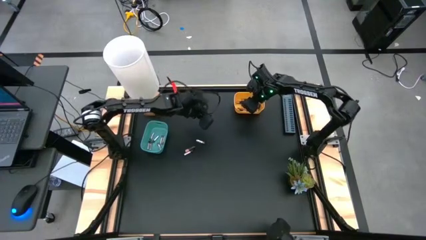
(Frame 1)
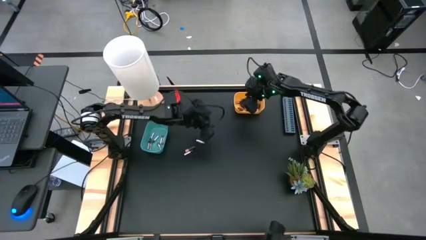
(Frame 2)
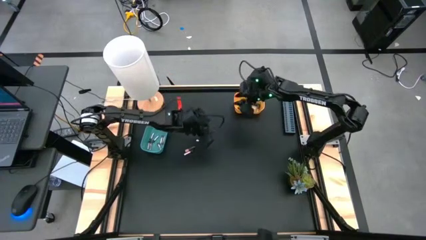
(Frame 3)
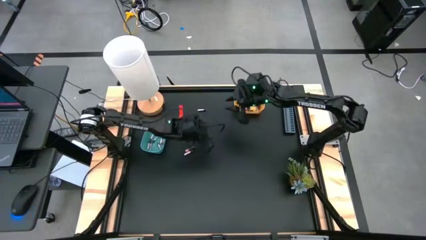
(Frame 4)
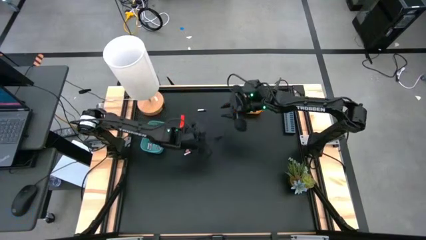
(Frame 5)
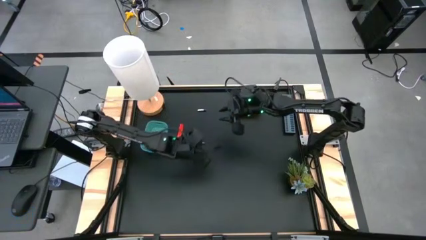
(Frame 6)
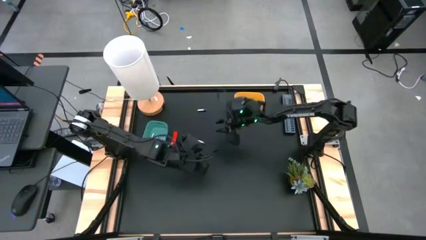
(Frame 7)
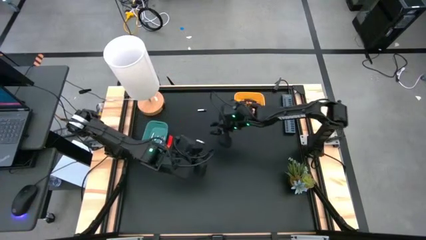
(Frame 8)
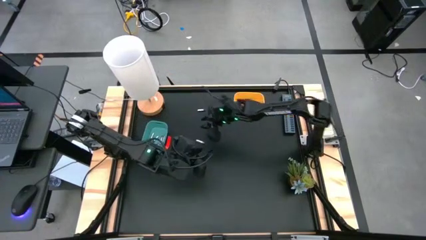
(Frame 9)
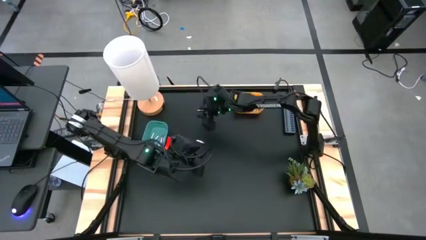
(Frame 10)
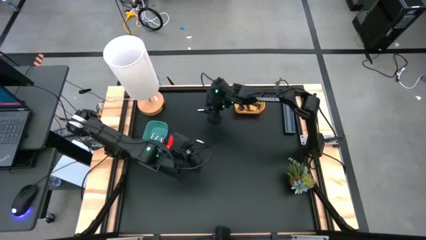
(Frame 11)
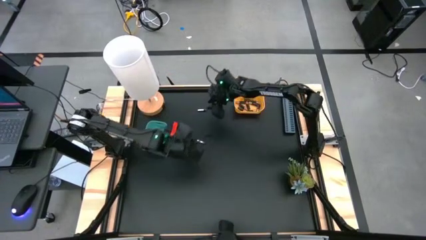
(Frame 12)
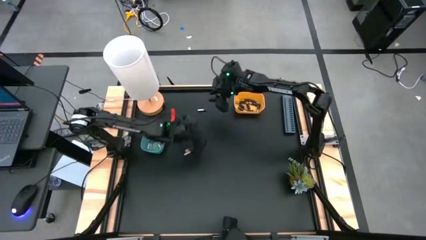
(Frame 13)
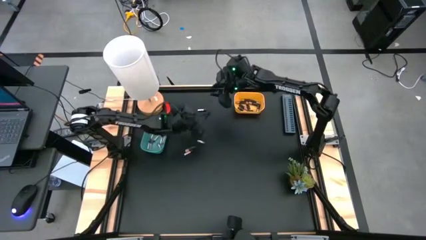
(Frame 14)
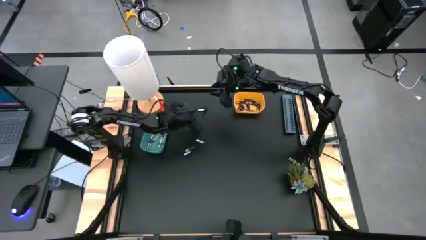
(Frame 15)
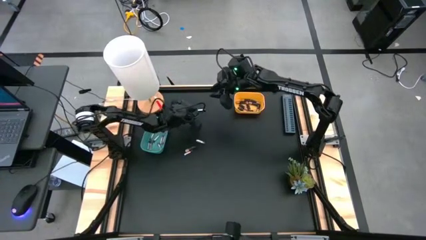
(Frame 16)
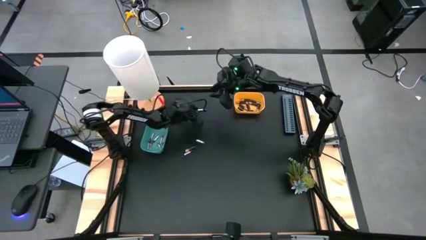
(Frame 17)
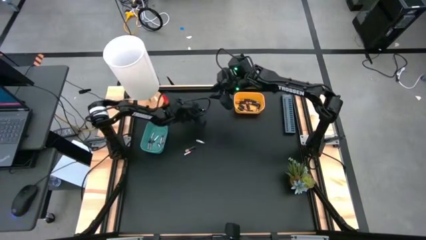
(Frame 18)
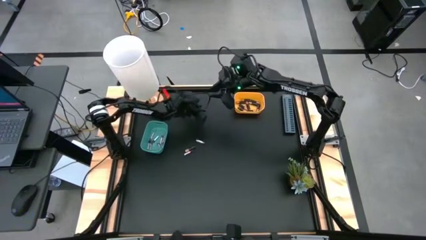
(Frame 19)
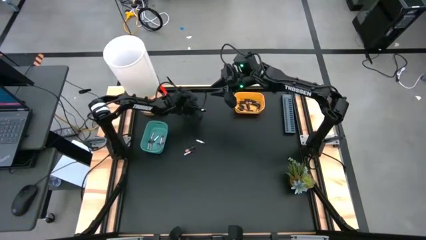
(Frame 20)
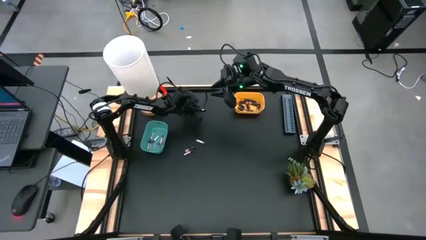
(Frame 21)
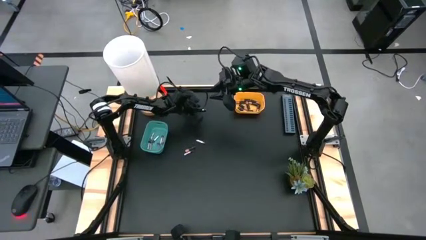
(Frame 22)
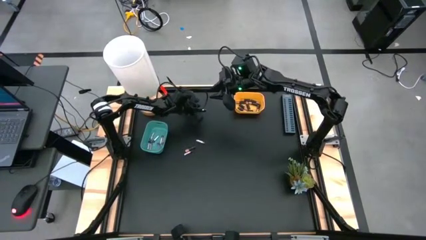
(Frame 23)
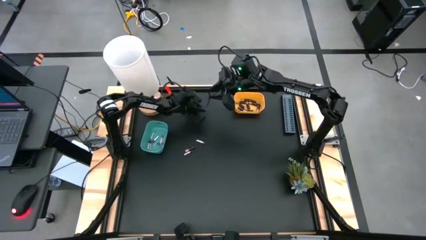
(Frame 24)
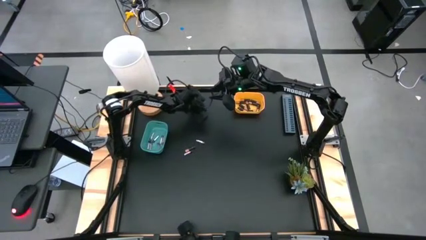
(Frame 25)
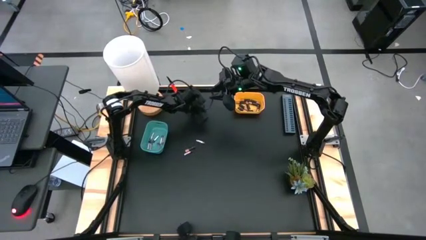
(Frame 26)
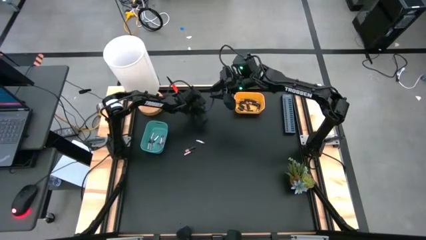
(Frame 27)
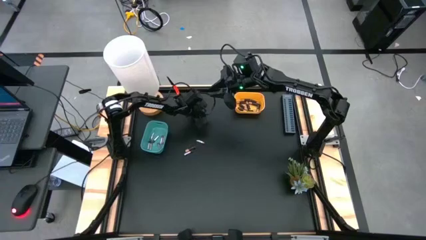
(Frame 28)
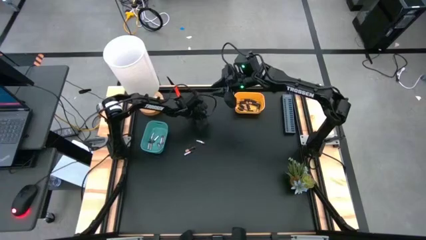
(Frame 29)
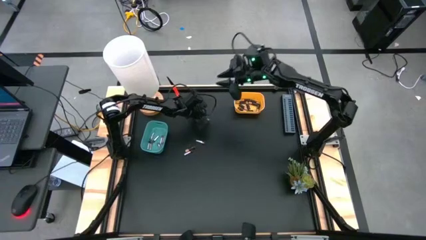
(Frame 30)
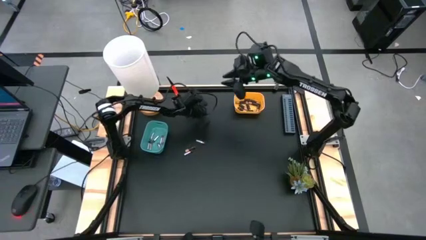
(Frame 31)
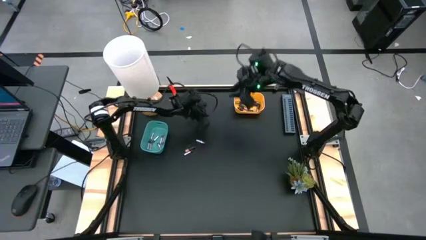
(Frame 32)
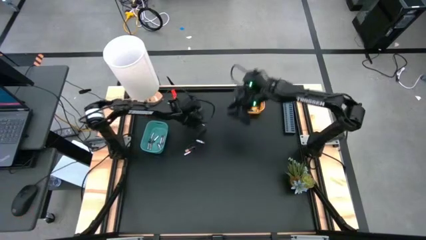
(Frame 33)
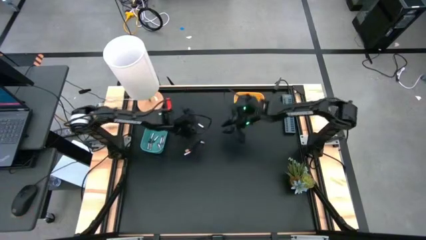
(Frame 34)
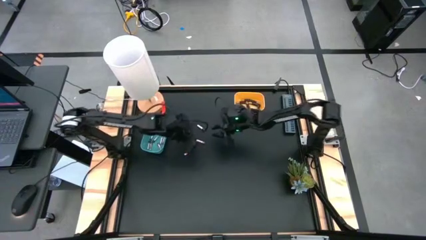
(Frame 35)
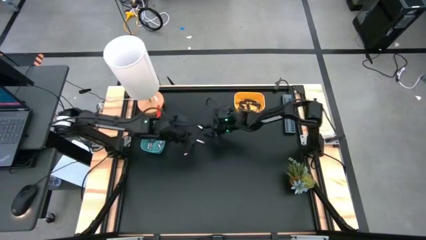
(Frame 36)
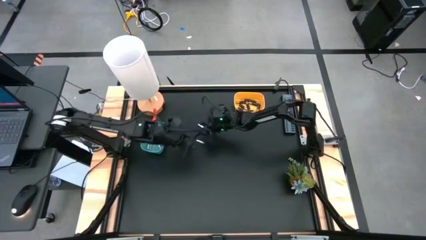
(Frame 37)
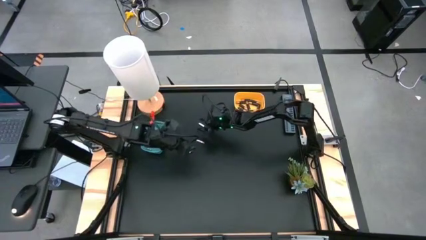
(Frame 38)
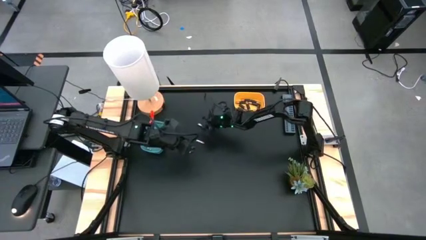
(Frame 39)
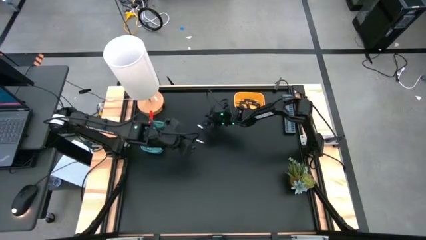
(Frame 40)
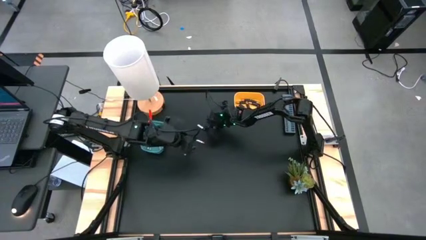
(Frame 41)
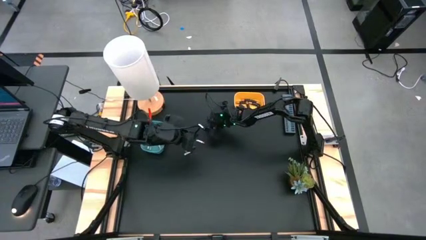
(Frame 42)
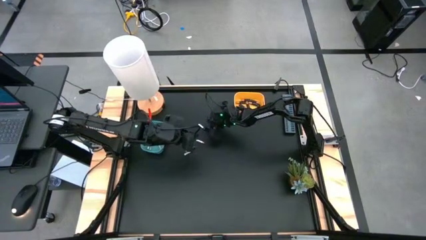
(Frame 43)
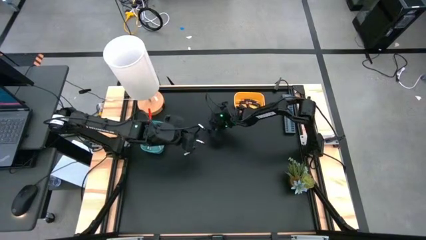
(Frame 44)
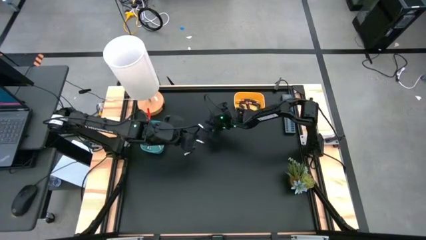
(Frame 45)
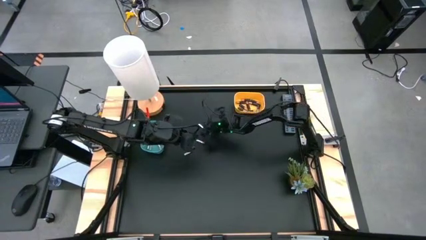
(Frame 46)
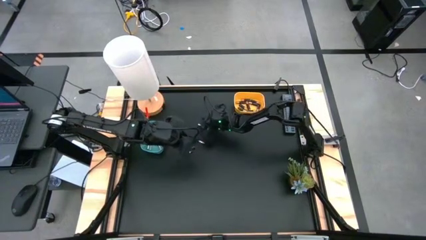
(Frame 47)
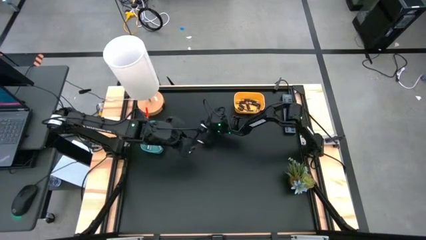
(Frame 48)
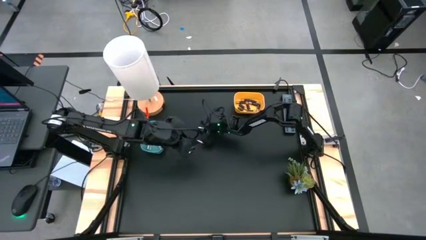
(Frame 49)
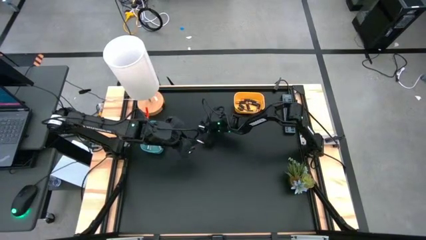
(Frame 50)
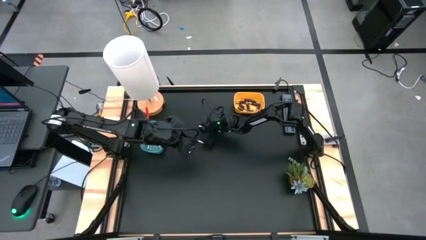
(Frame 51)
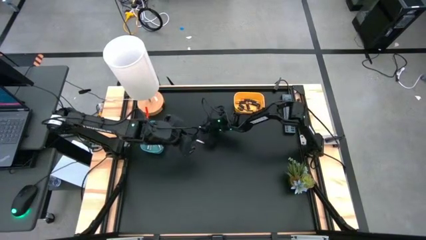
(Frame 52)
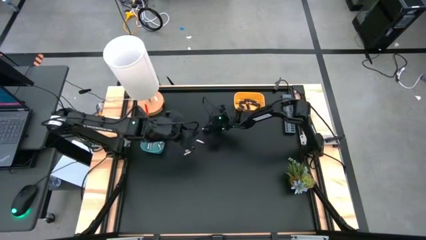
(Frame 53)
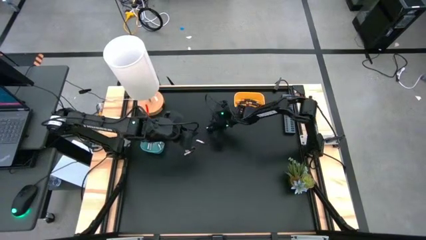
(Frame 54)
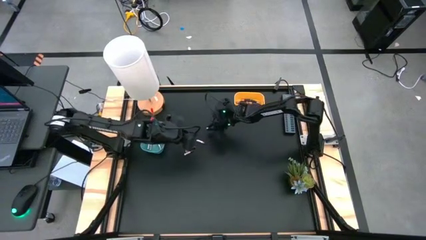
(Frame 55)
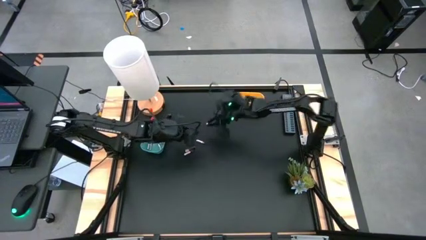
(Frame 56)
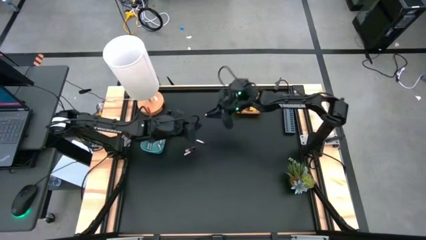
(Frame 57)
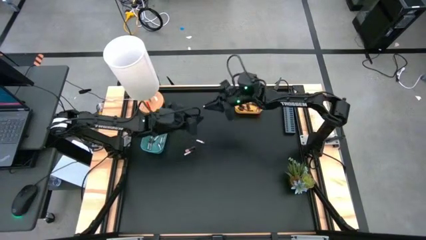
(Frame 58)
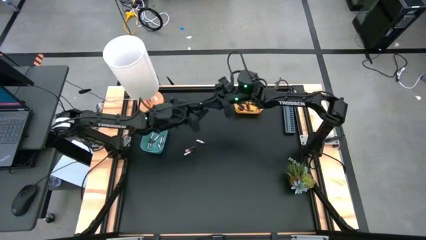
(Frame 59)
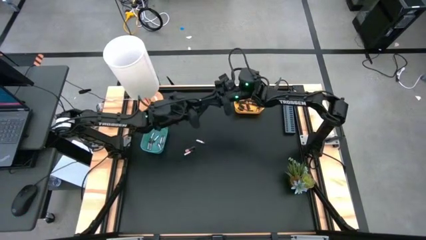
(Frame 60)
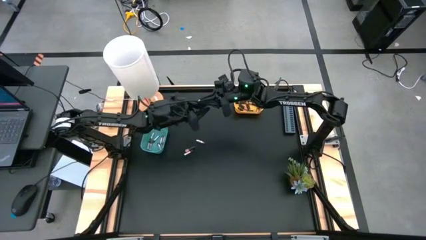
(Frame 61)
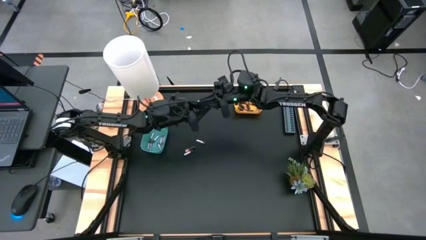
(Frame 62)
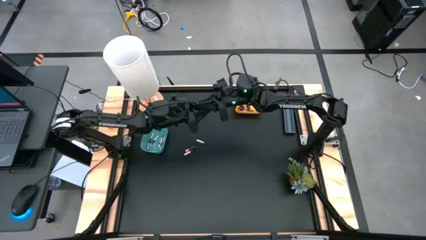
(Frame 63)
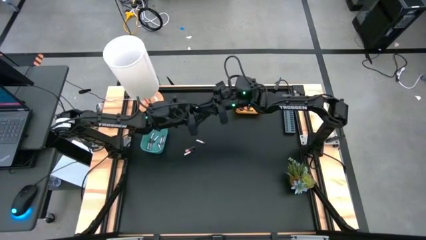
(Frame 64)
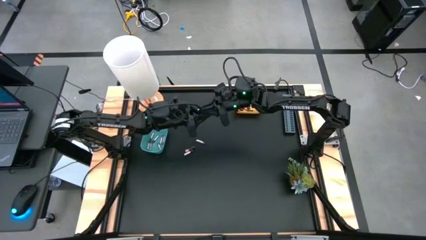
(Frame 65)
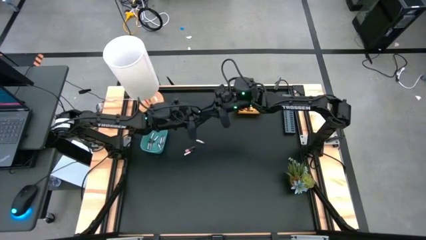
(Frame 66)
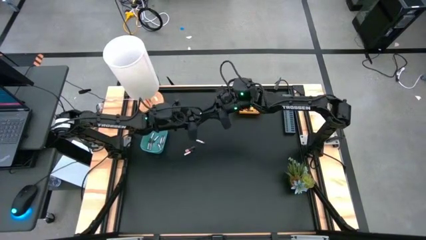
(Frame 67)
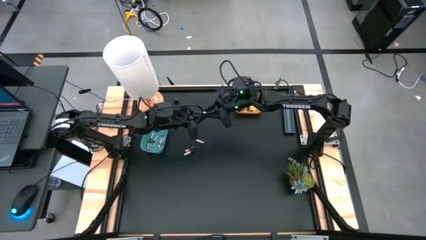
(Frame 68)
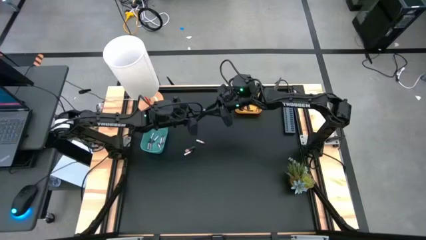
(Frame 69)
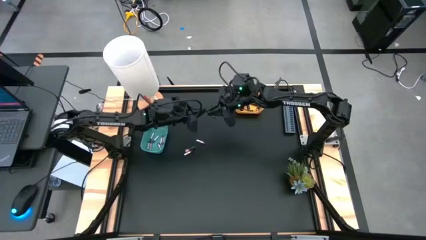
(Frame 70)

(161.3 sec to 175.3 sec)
Task: Sort batteries
Put the silver battery into the green bin

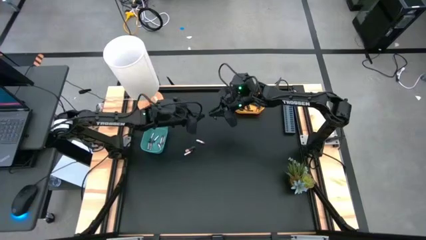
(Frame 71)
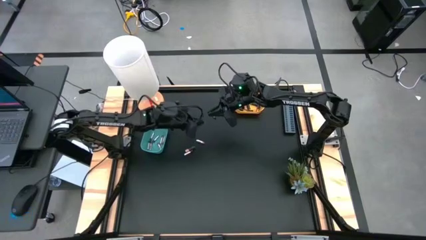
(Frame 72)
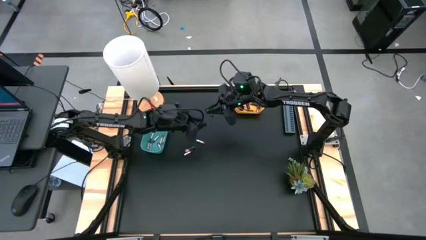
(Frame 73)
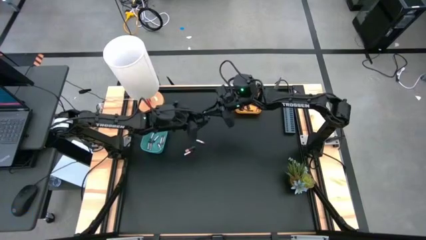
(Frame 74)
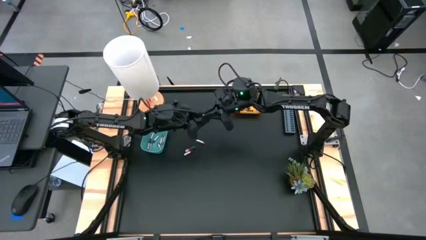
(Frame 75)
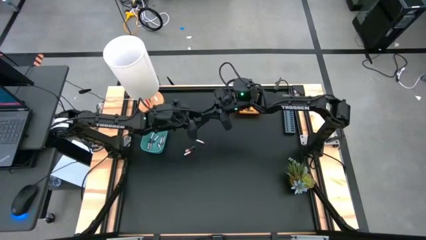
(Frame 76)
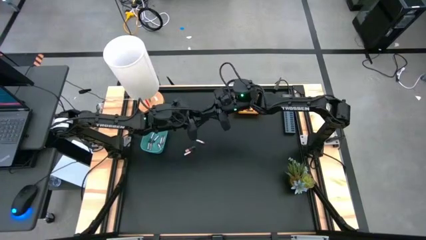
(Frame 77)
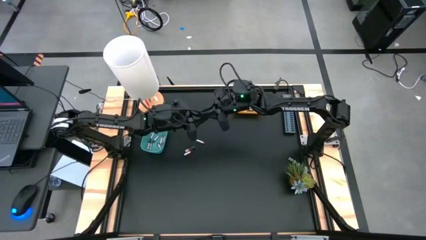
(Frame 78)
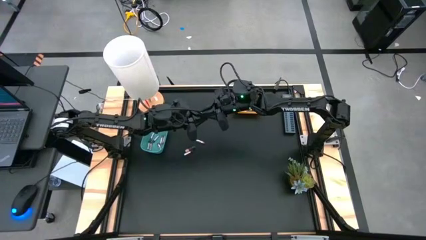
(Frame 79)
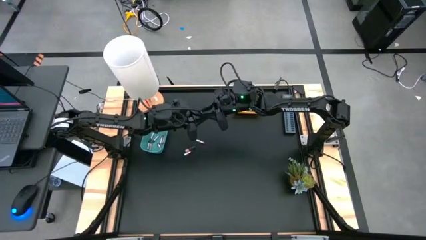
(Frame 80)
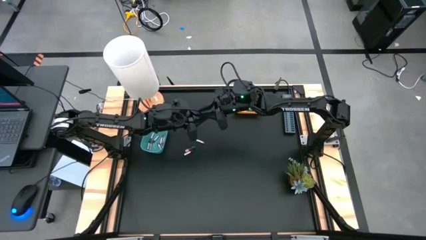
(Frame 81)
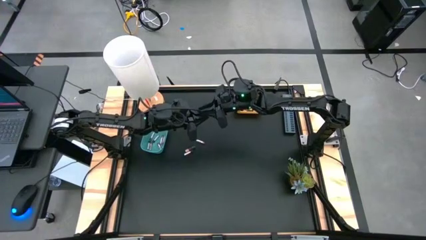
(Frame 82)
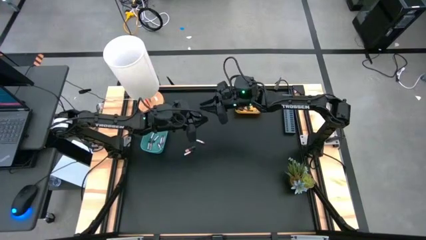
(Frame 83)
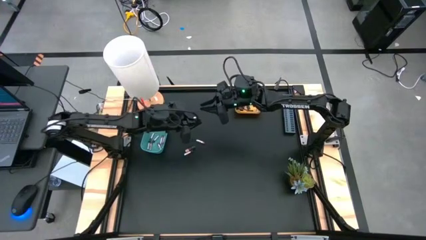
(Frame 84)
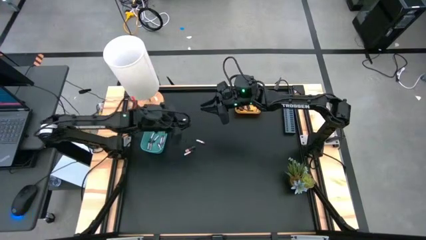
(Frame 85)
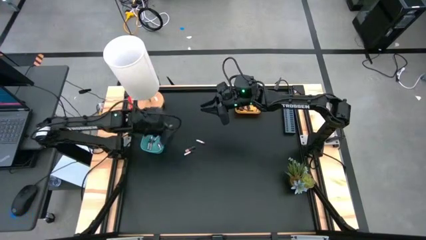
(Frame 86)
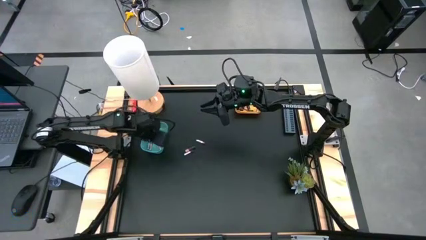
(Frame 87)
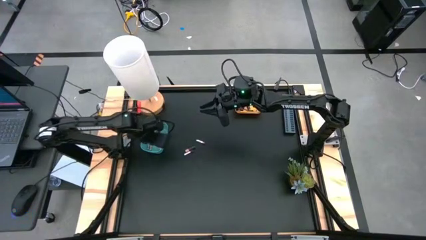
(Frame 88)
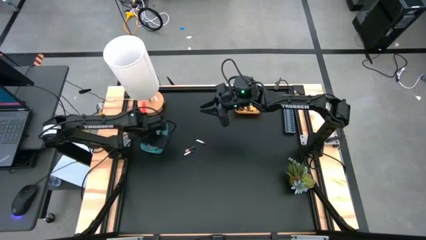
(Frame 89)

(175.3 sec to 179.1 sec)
Put the silver battery into the green bin
